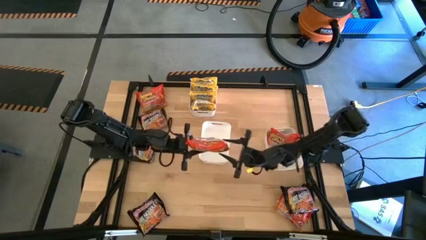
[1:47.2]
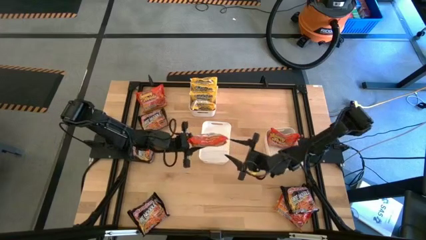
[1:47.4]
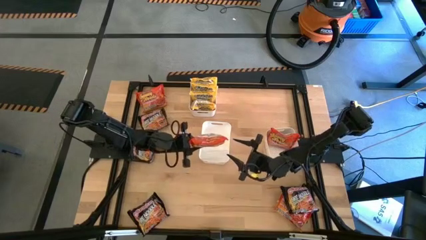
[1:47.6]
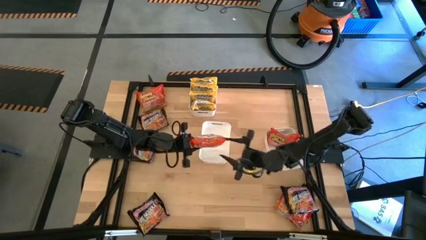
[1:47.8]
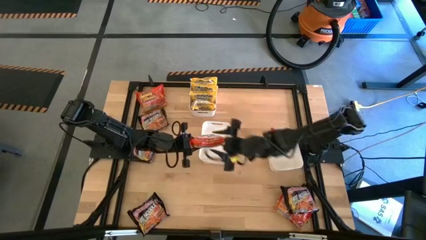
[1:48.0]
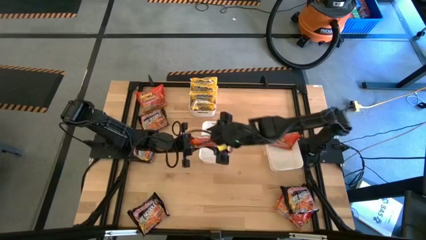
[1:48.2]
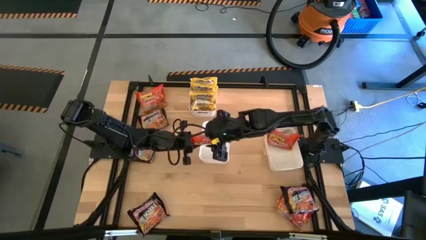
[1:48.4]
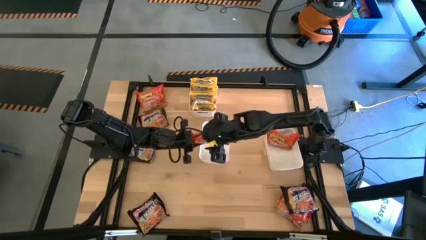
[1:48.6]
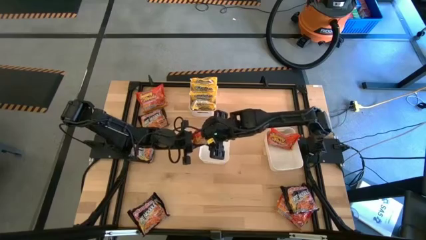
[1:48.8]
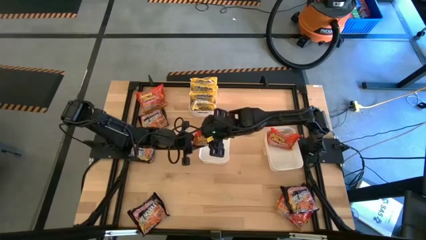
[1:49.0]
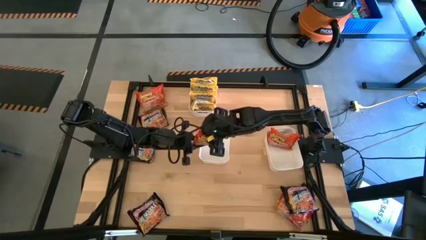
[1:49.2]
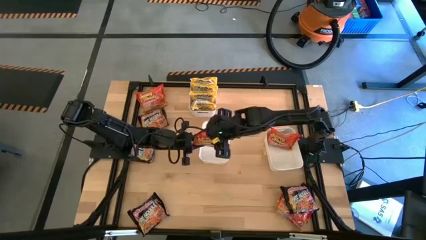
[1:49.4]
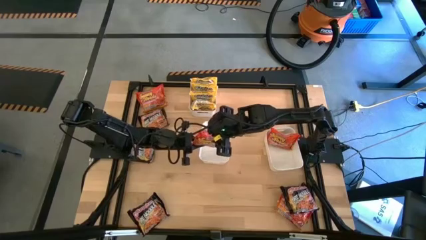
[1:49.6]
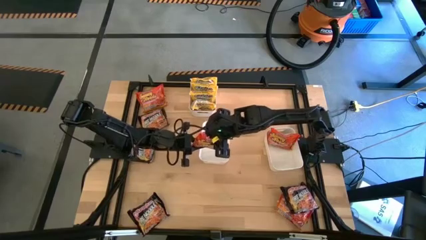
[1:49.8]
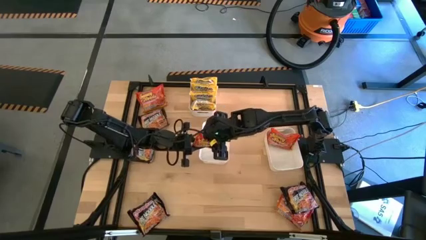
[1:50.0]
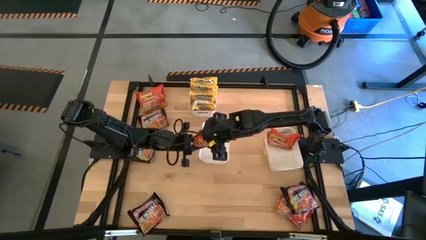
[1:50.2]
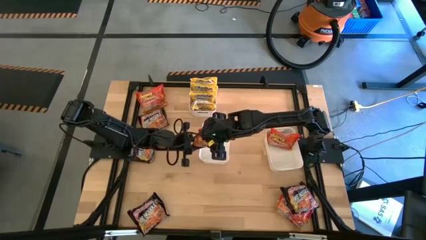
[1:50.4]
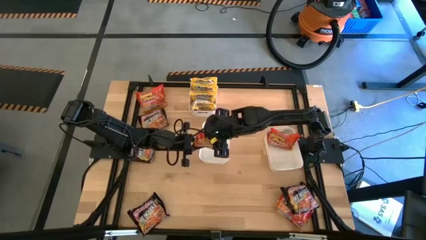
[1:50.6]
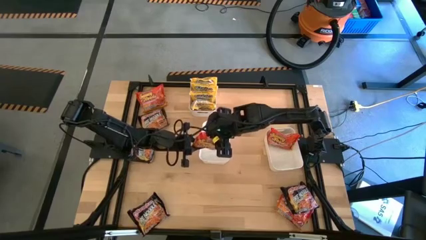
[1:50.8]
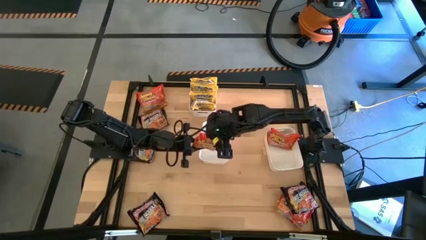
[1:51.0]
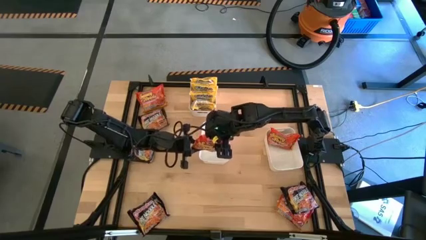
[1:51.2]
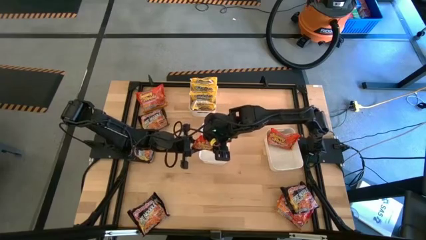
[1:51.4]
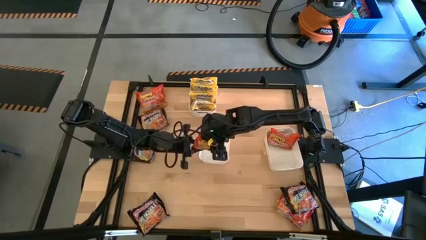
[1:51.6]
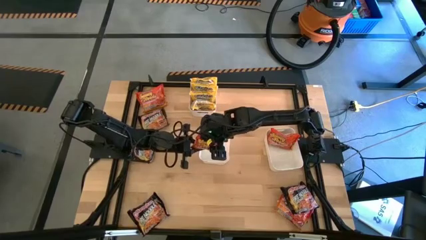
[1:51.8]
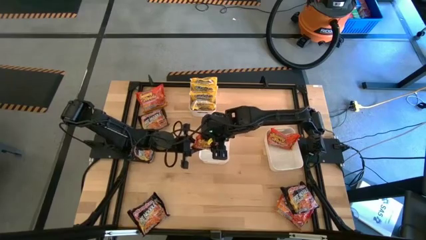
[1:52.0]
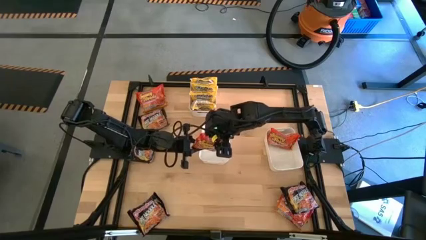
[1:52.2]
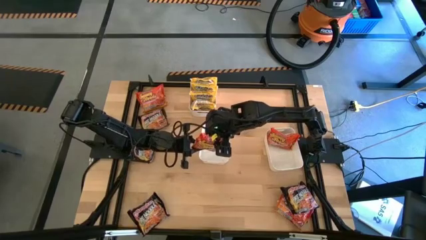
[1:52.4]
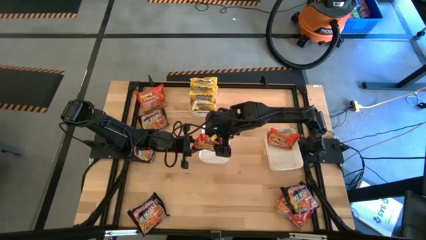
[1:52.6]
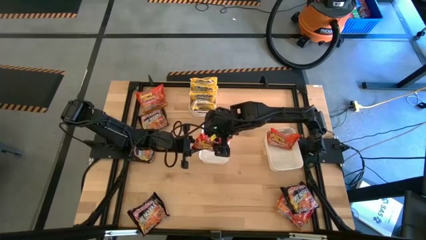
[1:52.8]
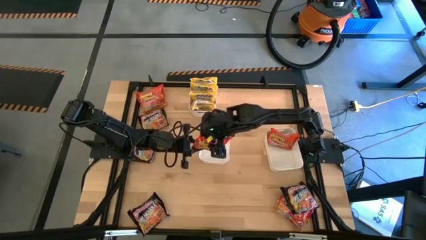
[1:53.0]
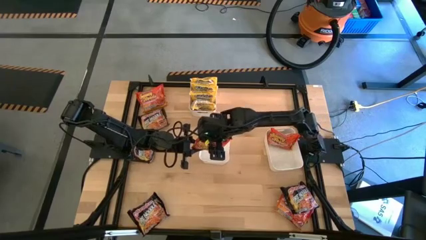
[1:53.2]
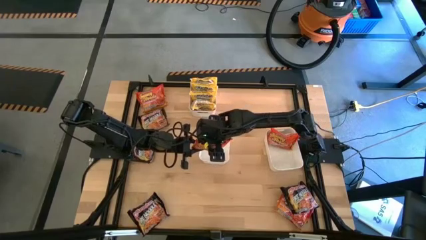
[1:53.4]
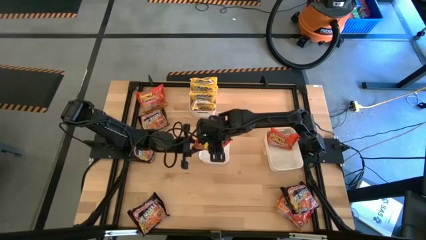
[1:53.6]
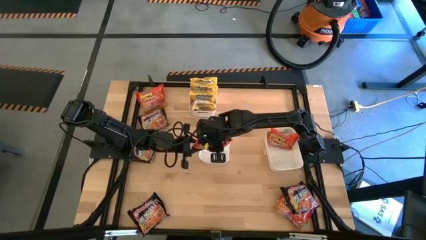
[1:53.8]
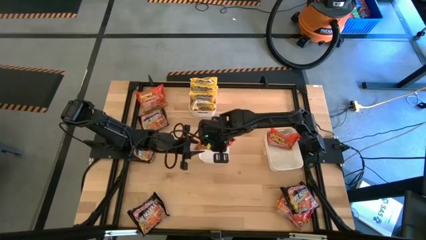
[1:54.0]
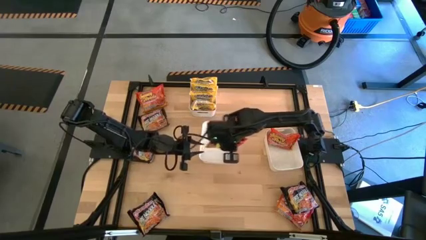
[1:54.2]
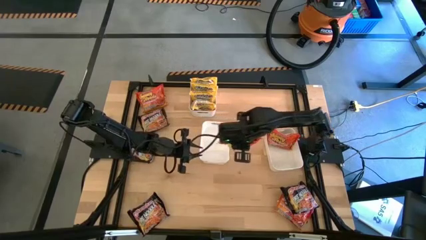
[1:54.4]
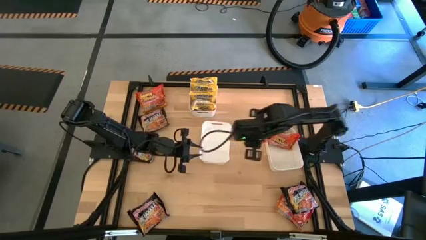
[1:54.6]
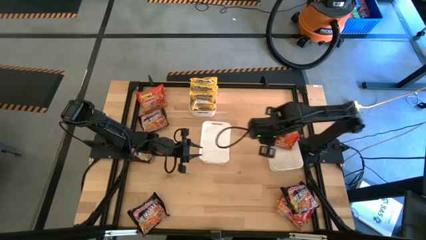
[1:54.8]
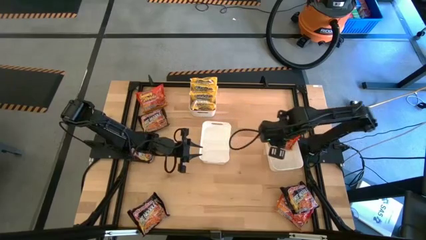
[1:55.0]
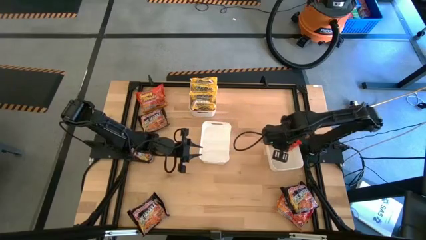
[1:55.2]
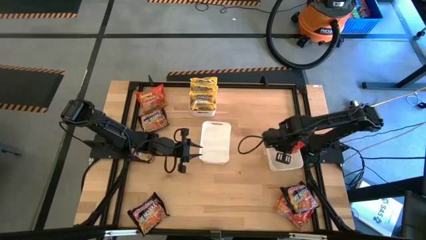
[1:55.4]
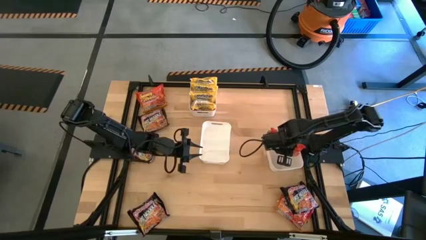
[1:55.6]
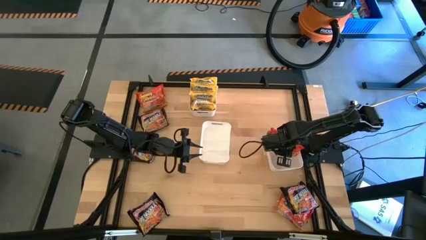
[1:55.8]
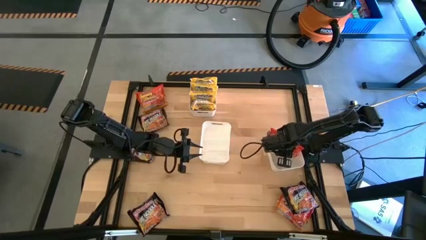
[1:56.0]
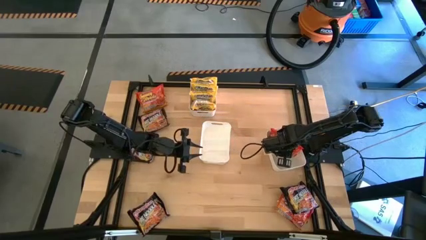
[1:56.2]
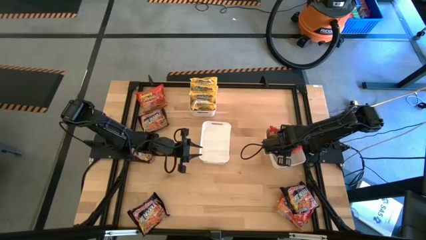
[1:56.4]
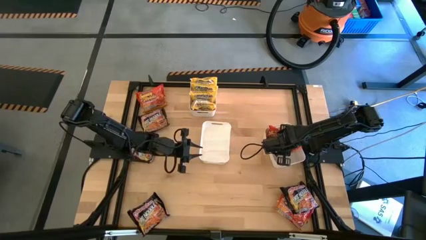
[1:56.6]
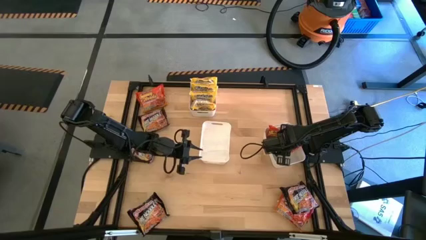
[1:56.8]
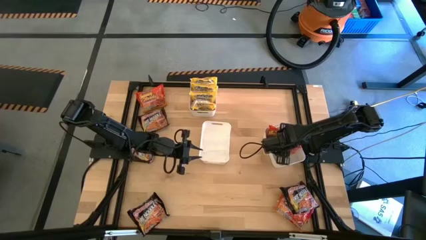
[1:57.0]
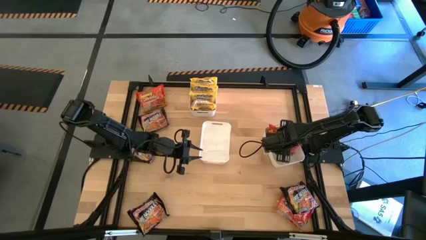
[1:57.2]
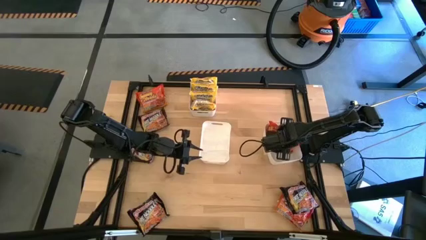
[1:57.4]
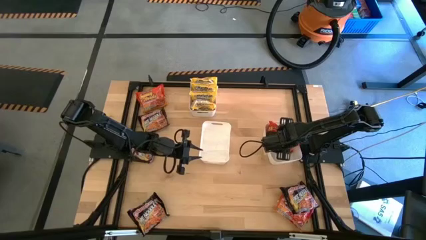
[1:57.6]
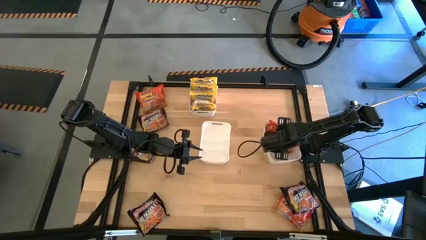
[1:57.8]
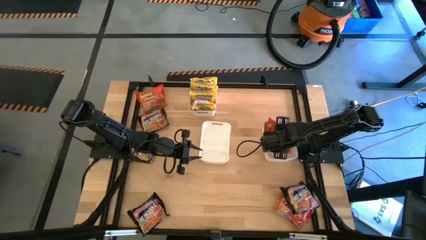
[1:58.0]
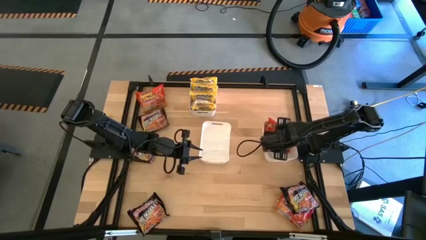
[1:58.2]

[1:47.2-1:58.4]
Task: Sort Maruchan noodles
Put the orange noodle pack into the bottom right white bin
